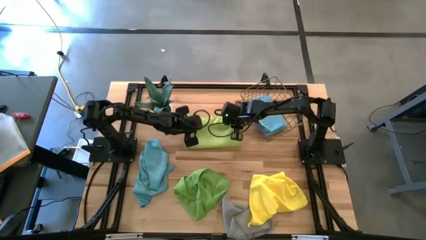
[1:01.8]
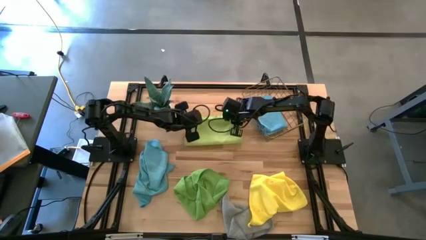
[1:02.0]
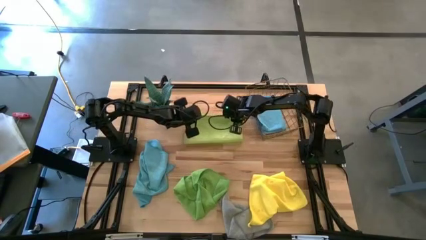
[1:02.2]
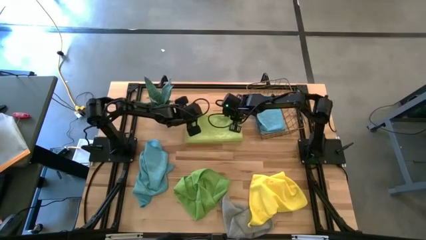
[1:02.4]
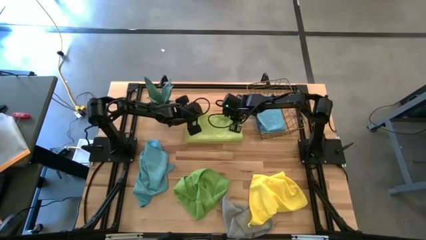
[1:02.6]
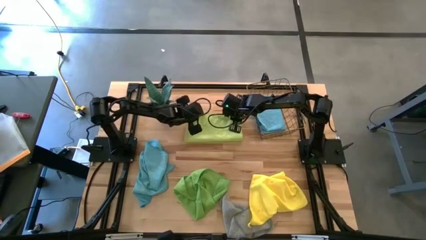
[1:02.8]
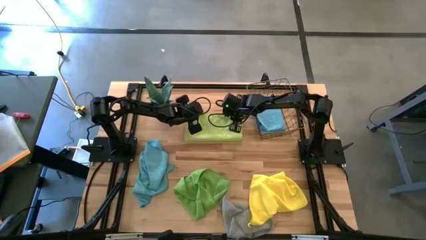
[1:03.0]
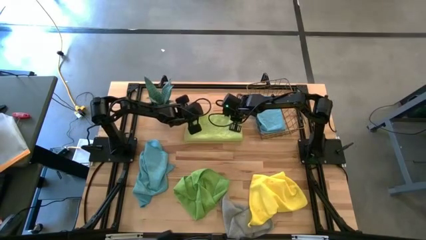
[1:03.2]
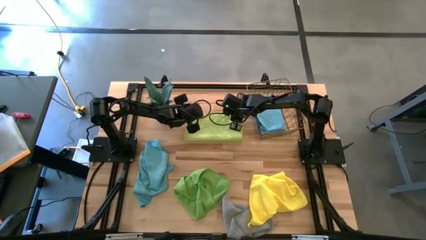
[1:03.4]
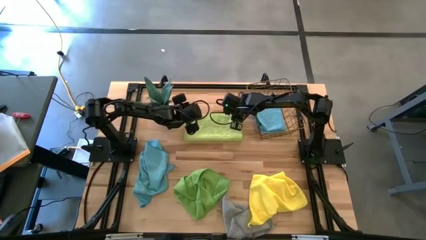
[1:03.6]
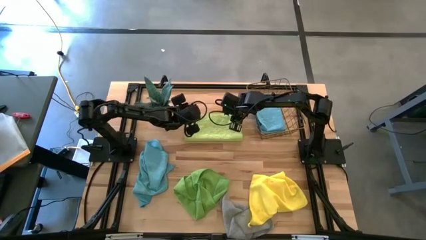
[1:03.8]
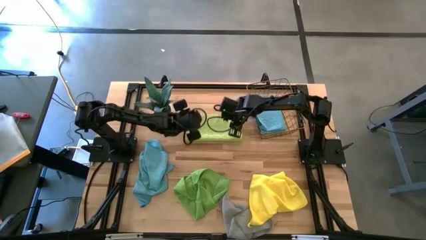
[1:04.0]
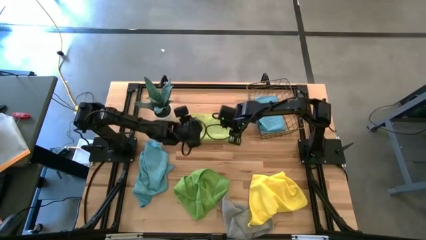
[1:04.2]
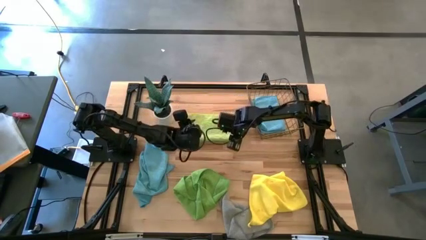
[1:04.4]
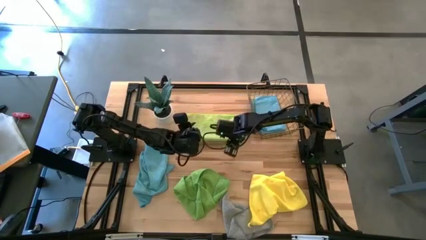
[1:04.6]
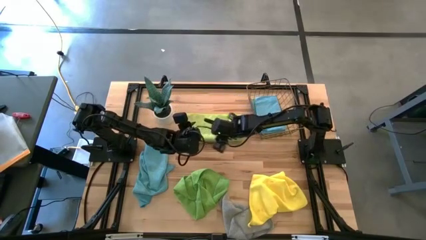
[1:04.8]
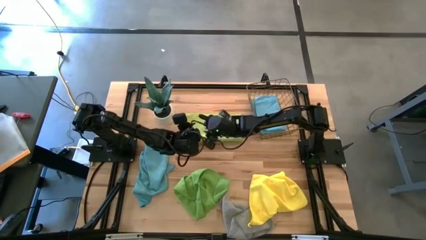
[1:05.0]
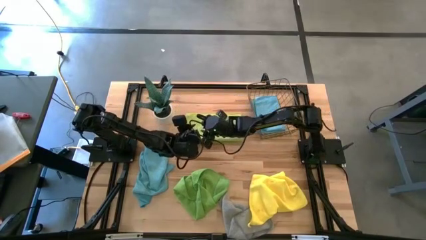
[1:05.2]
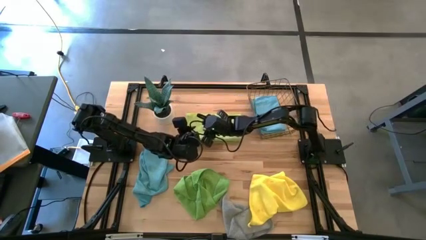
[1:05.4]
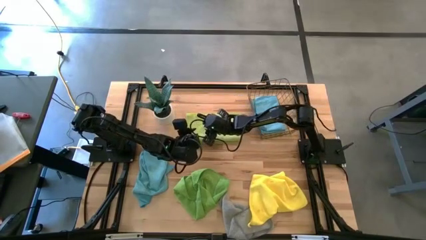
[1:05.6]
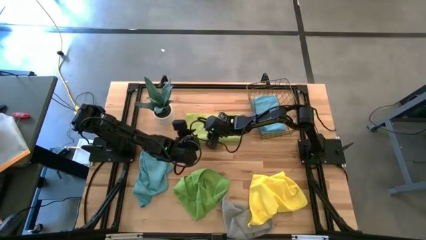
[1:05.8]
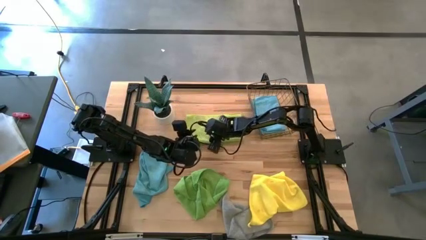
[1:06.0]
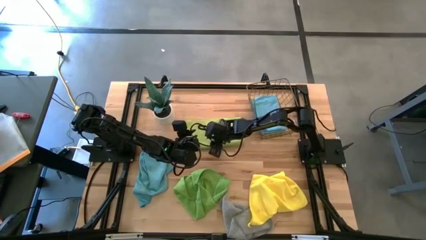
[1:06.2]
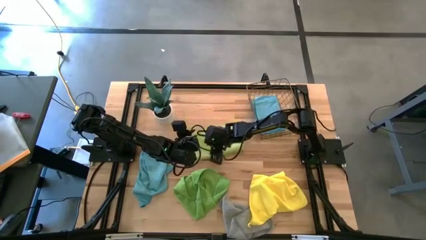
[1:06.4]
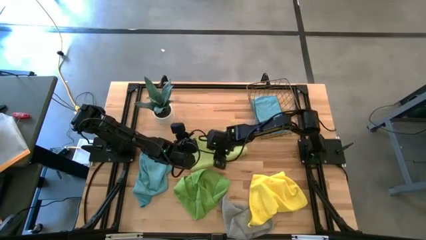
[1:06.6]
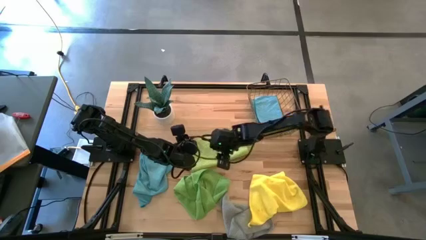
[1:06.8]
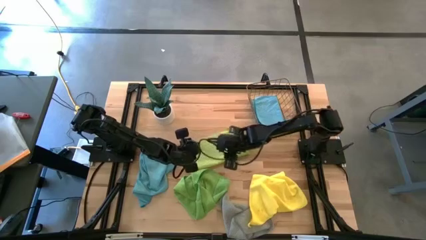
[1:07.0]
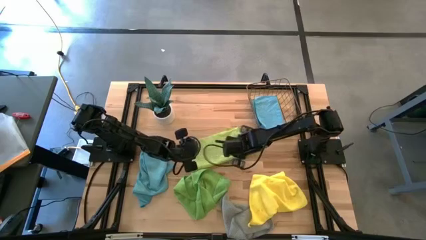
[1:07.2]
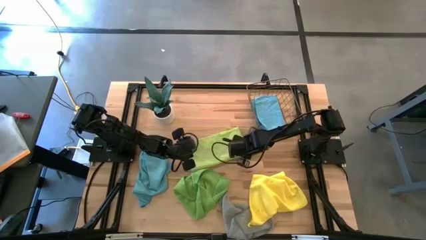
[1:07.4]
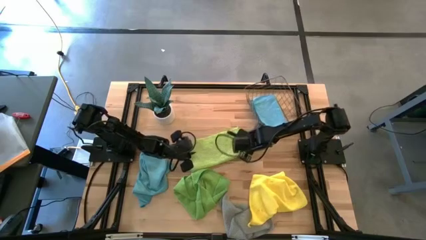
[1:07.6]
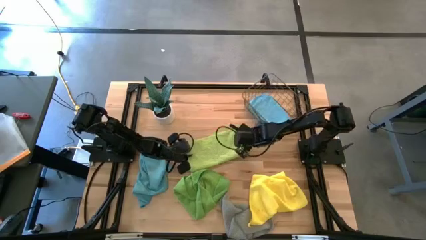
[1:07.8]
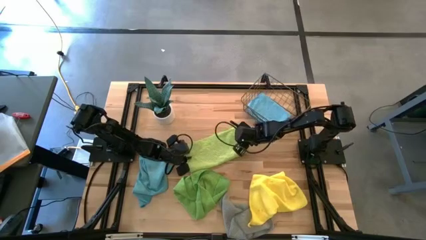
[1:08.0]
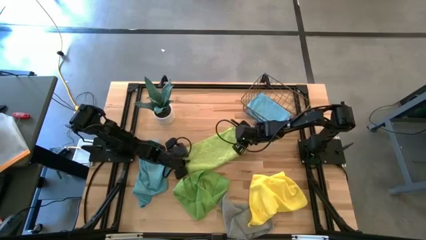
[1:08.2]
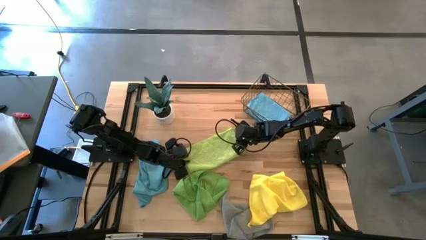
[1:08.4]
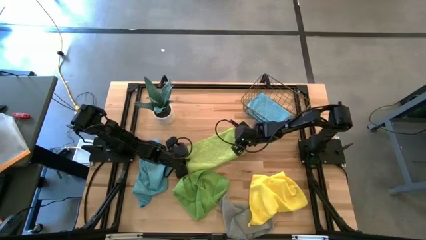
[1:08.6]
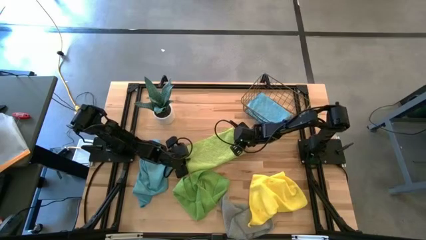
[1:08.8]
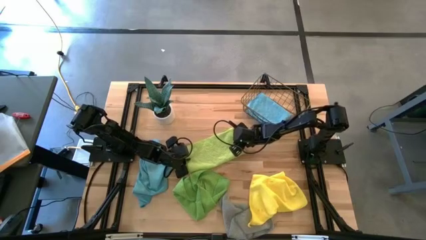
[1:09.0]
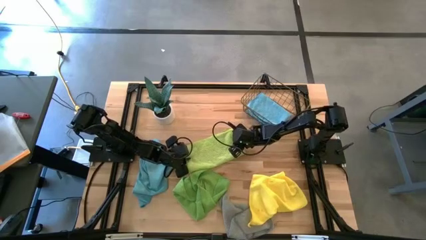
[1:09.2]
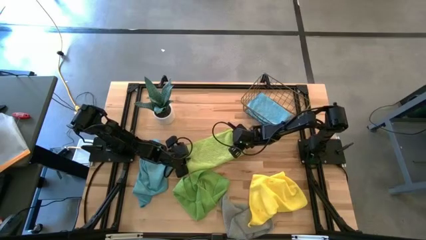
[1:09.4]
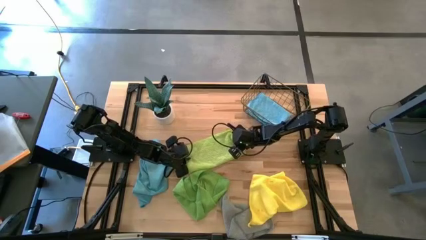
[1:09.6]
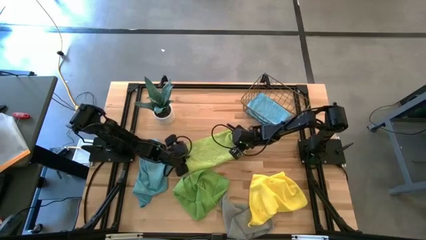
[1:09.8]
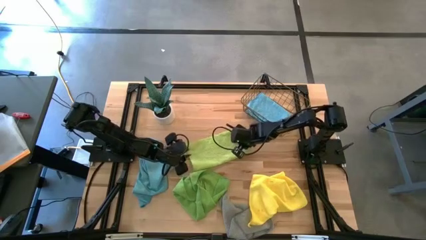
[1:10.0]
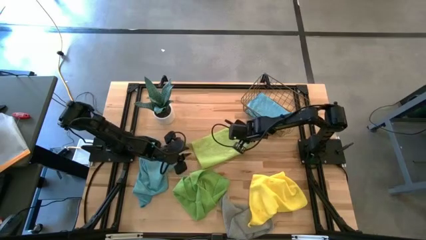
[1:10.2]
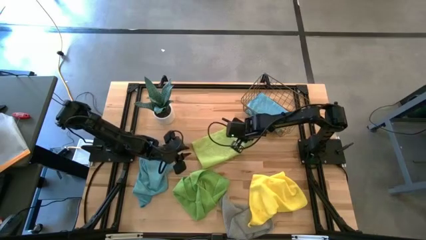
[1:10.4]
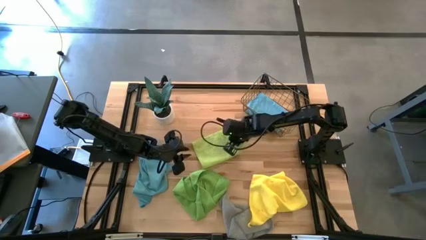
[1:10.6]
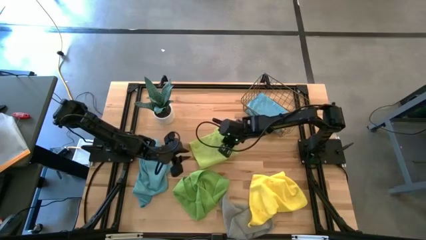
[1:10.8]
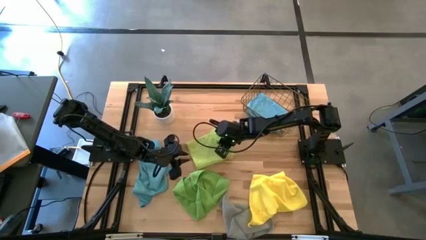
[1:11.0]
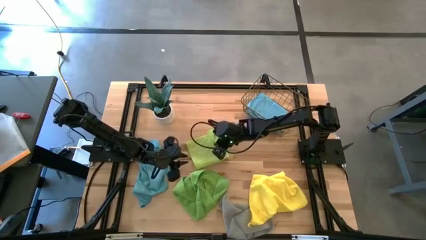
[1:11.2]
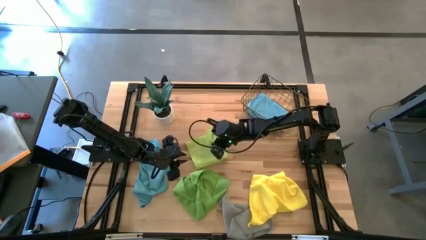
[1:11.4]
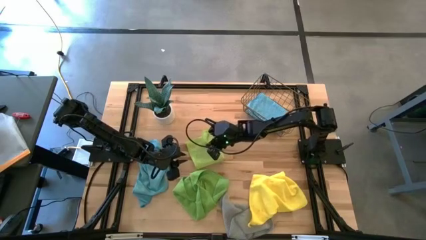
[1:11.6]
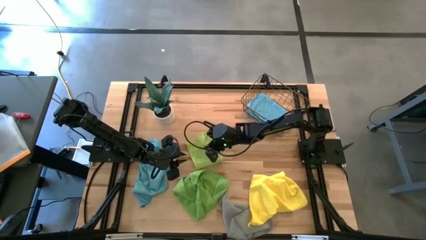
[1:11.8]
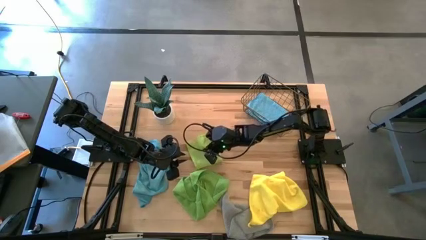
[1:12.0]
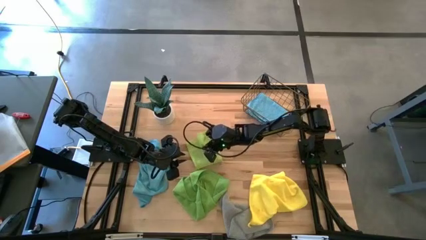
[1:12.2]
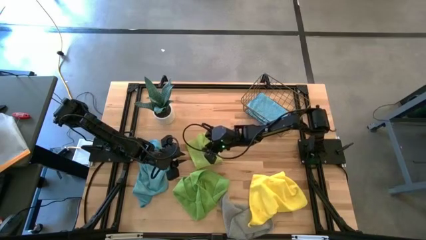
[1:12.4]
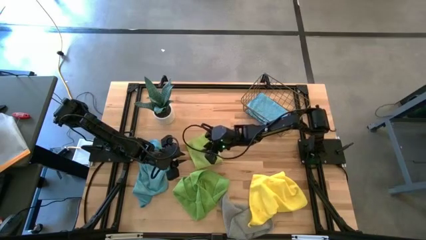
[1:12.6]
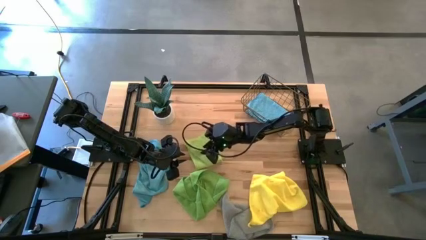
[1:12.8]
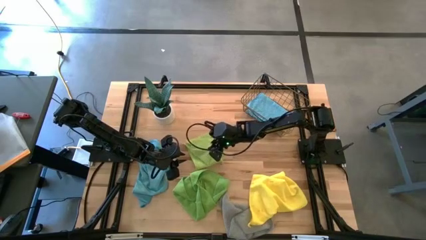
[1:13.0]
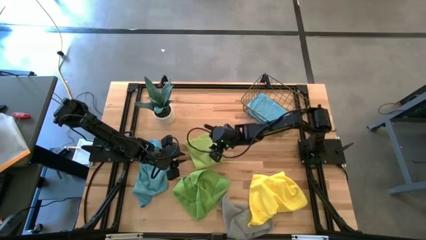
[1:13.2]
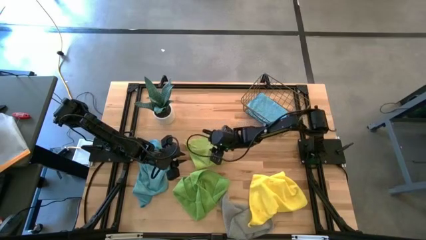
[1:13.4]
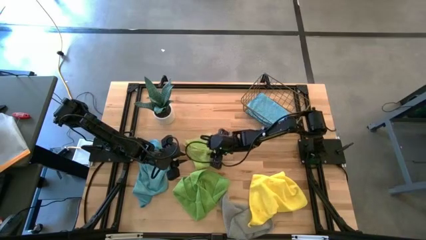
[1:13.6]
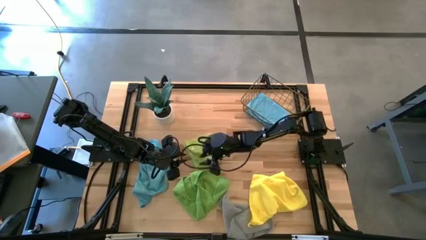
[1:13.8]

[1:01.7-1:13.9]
Task: Fold microfiber towels
Fold the light green towel
